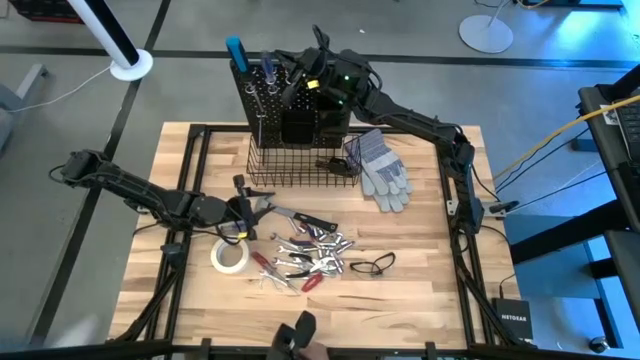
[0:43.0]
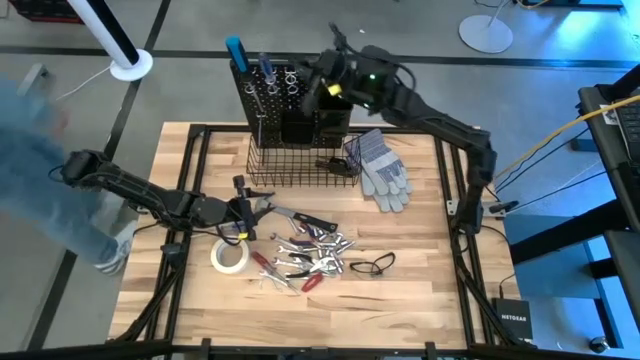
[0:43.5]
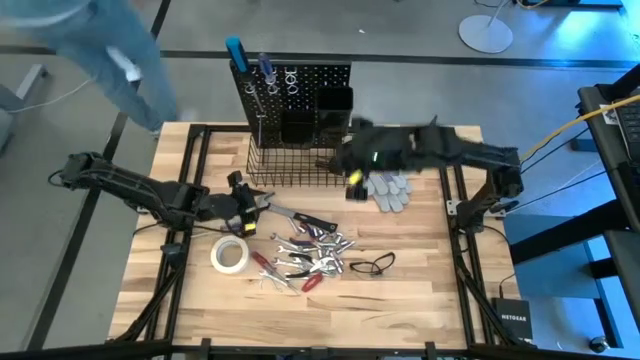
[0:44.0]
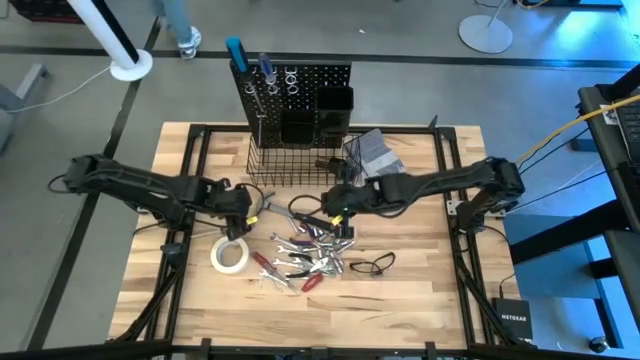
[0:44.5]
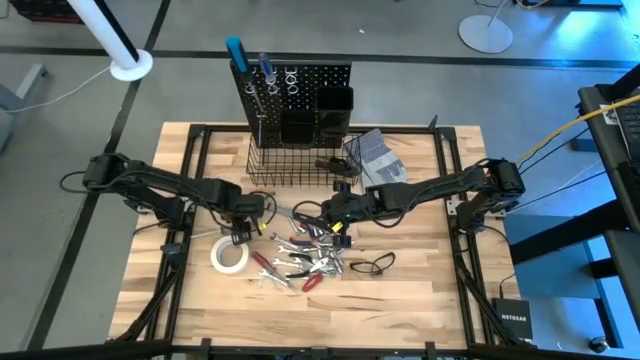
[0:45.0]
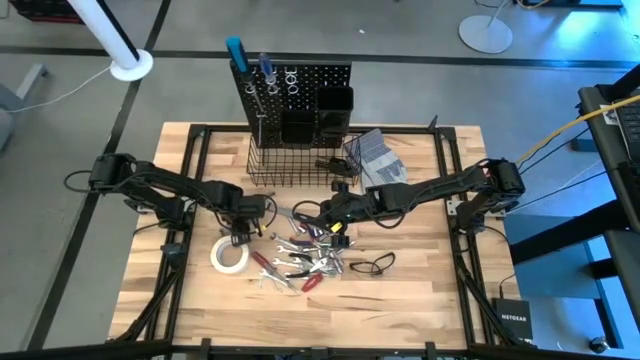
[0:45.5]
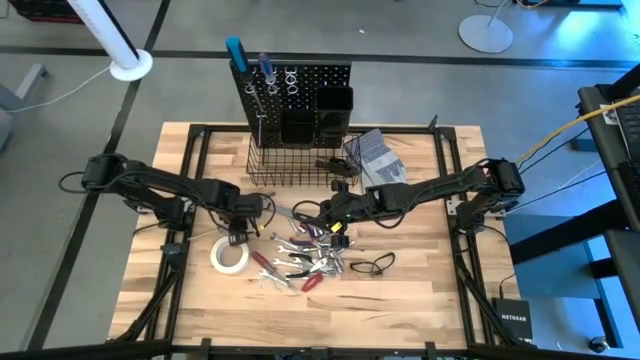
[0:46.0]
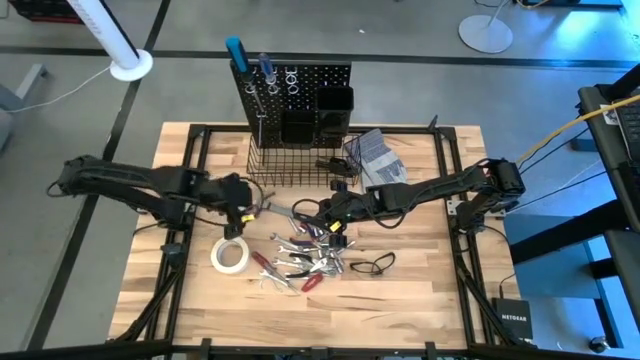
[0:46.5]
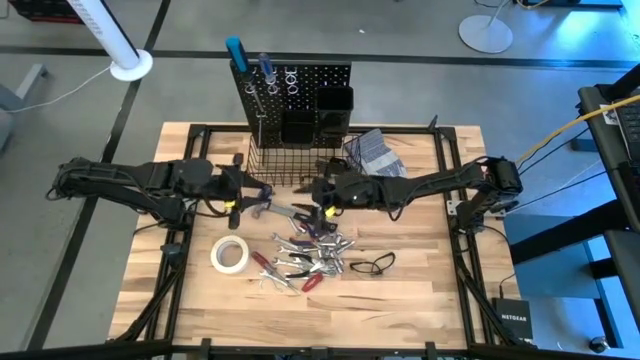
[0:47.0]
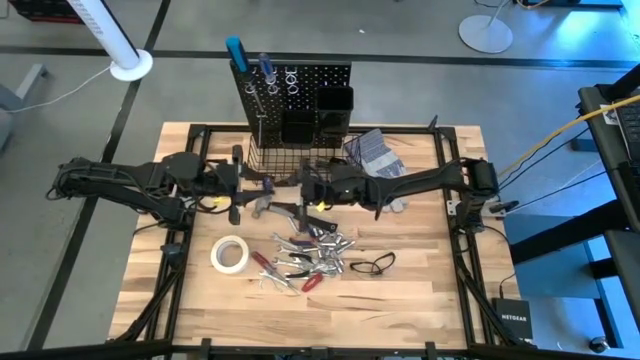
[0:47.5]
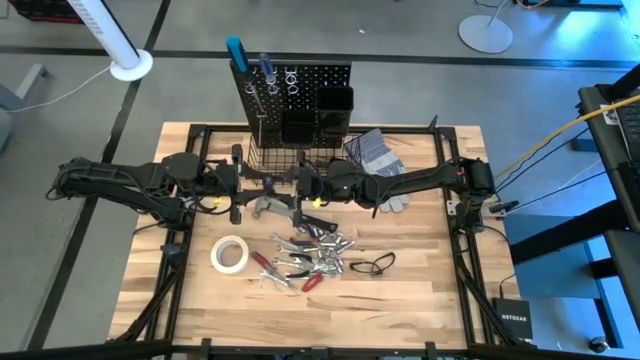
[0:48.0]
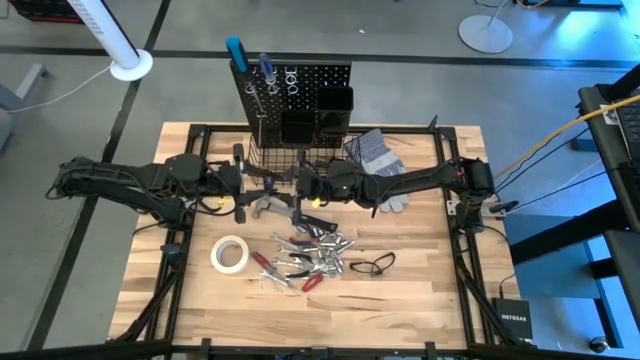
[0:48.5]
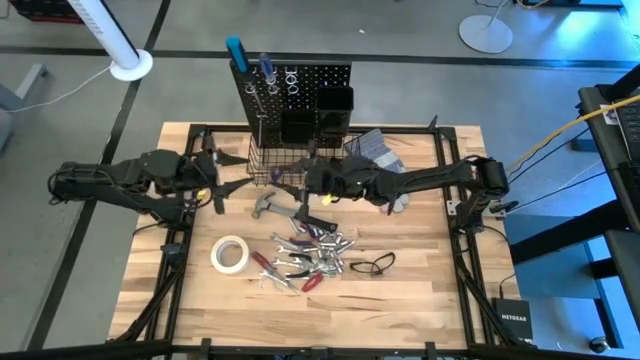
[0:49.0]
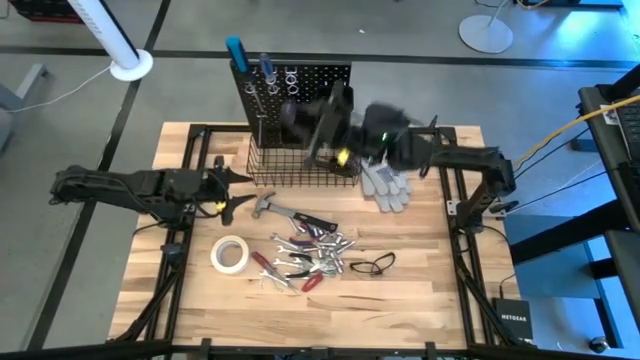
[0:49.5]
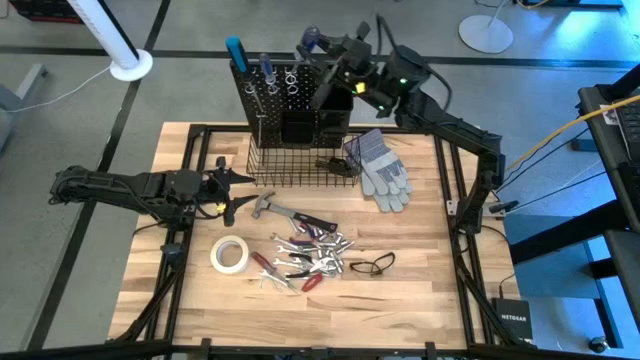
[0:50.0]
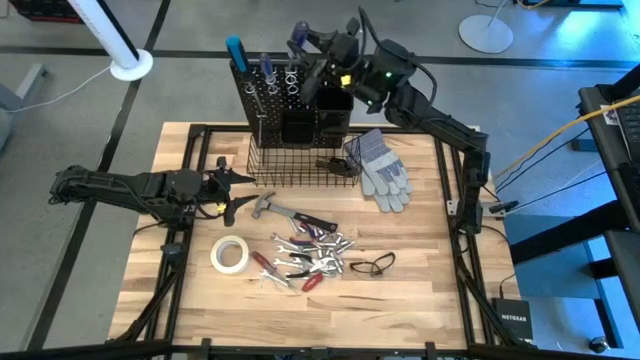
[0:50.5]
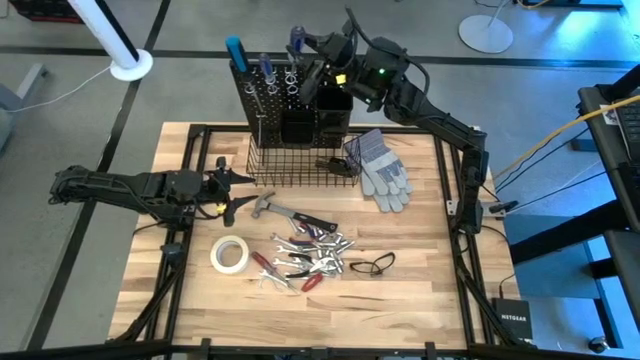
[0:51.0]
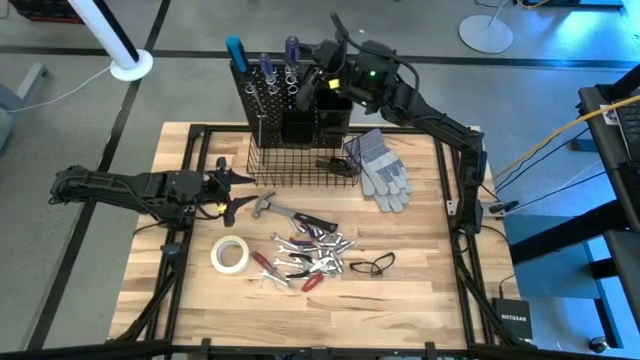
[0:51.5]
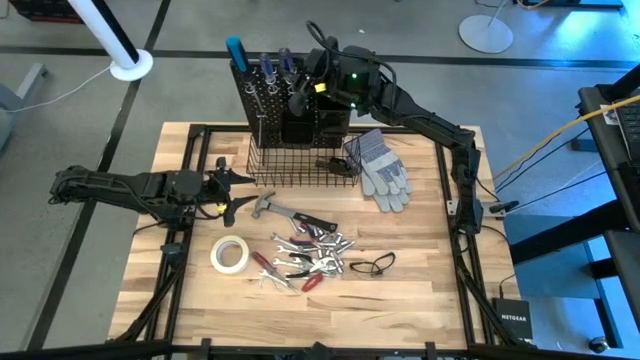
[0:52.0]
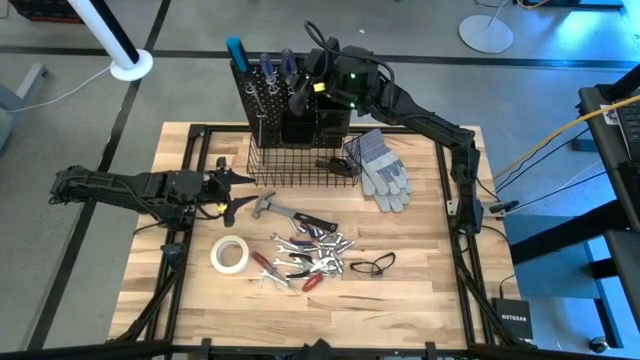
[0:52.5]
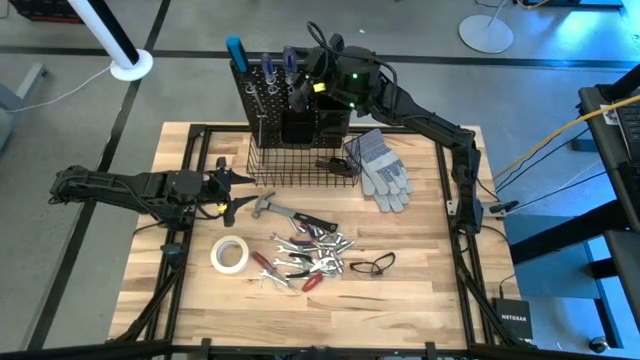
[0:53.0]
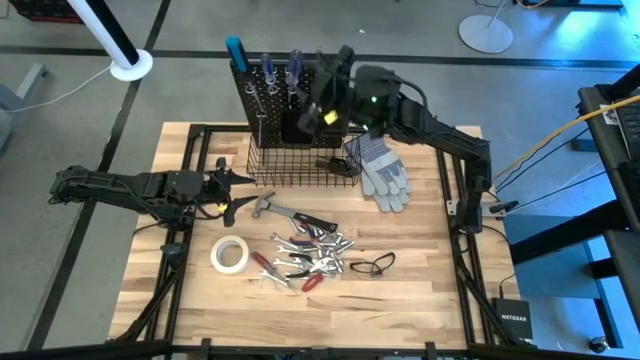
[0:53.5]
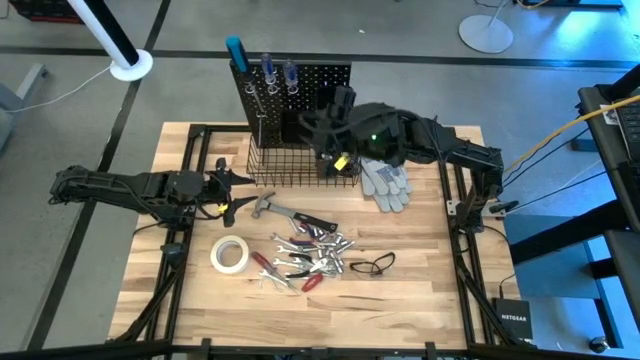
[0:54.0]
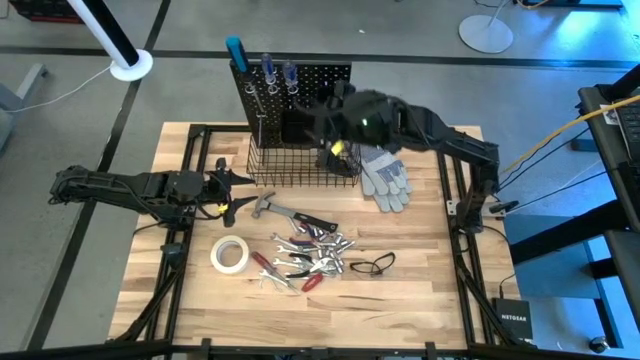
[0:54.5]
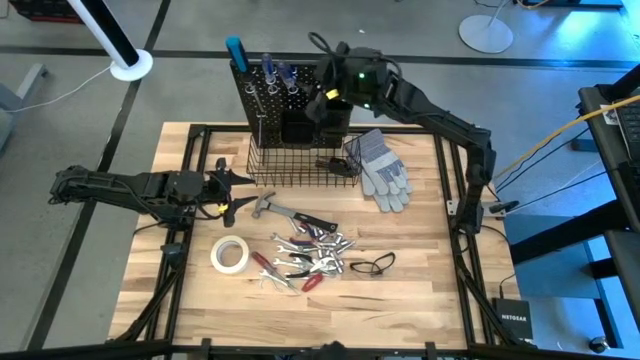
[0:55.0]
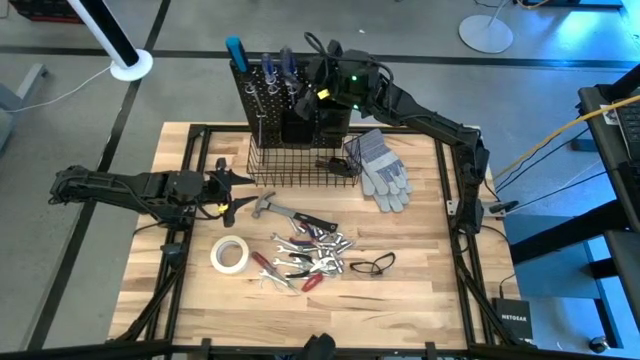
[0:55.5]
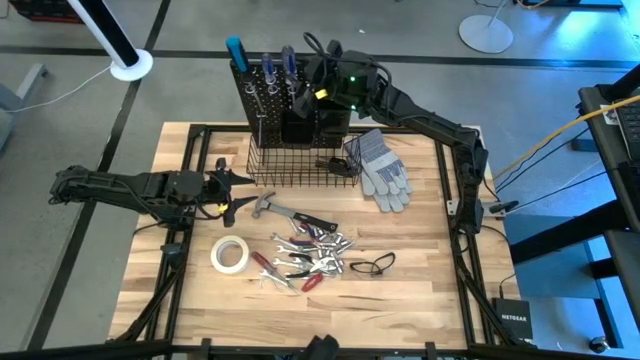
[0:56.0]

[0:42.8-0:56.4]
Task: Hang tools onto peg board
Hang the transparent blue screwdriver on the peg board

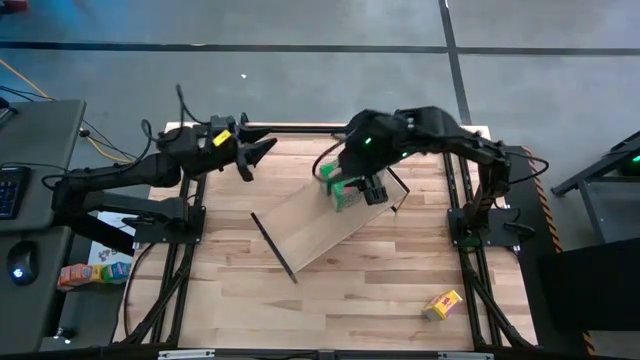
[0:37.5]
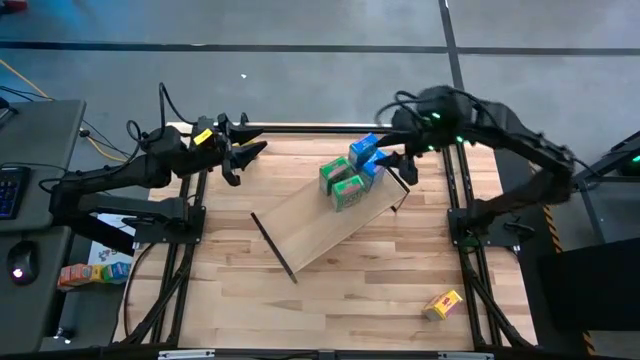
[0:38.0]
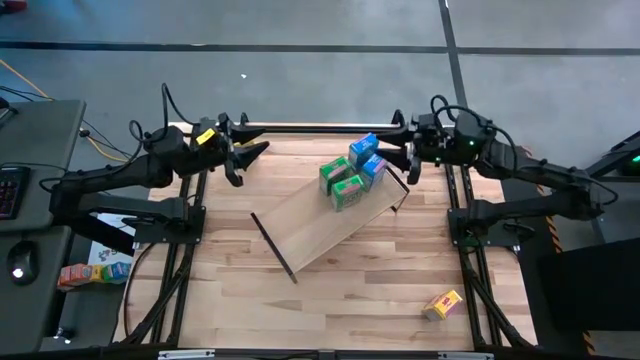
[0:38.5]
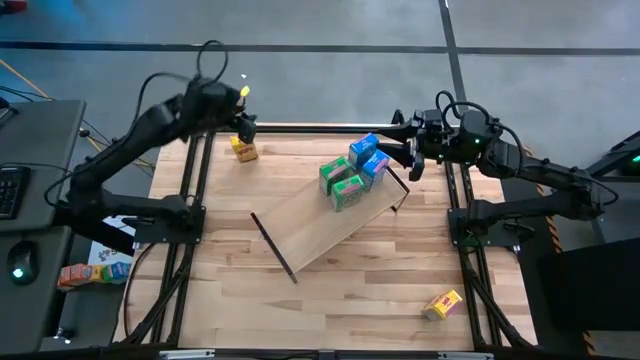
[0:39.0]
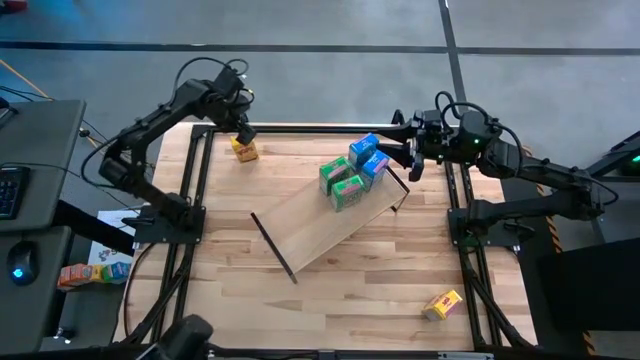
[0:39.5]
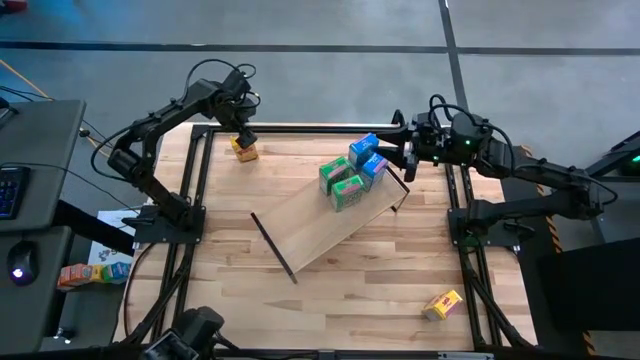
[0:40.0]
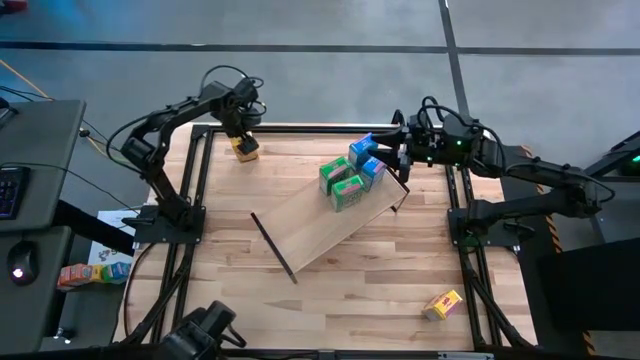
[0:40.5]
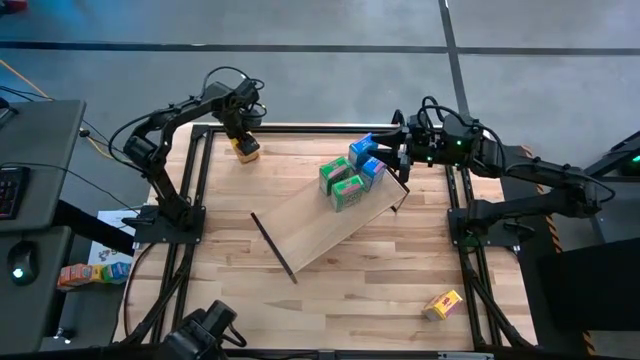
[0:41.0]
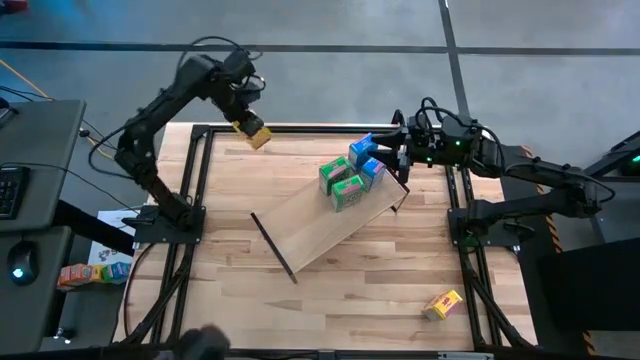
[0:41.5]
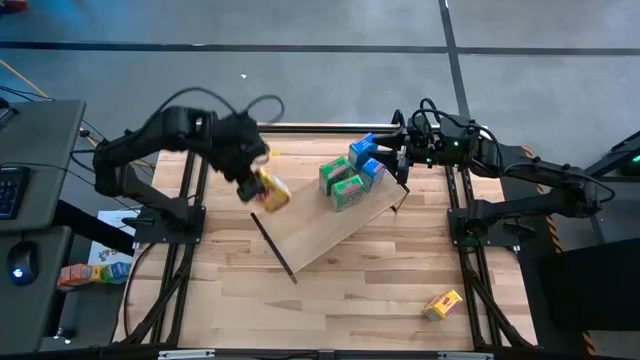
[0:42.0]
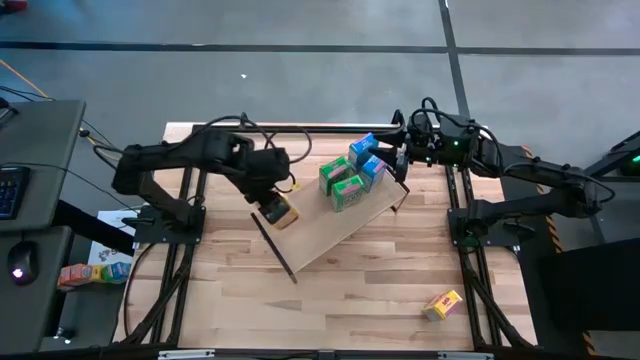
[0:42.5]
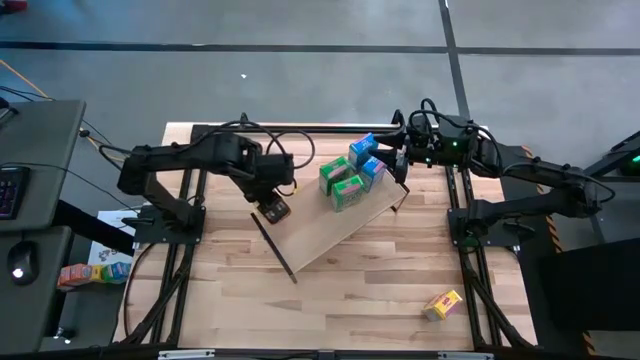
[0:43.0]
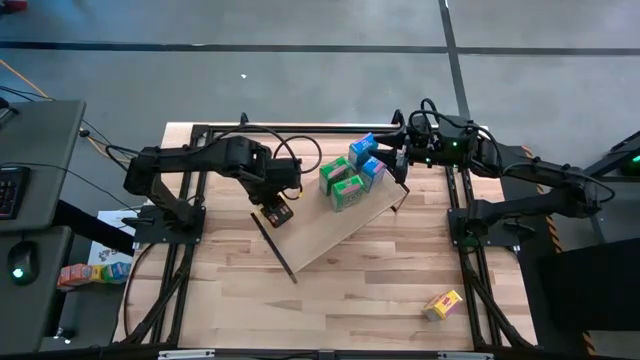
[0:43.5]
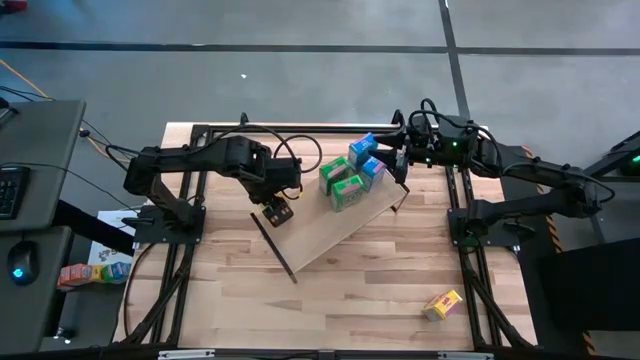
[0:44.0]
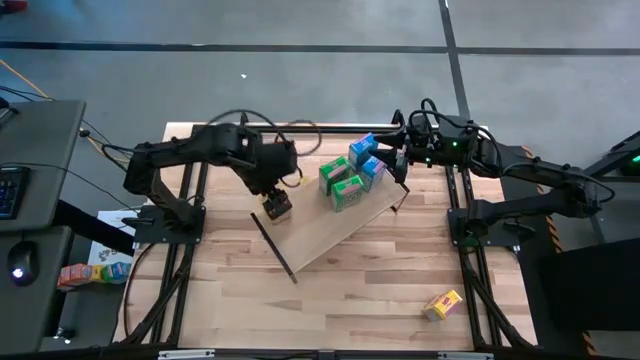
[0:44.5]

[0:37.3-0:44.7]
Task: Stack cereal on shelf
Put the top yellow cereal box on the shelf
